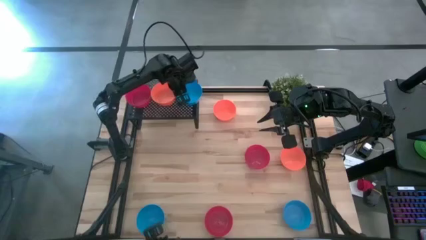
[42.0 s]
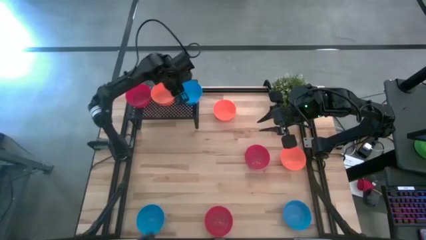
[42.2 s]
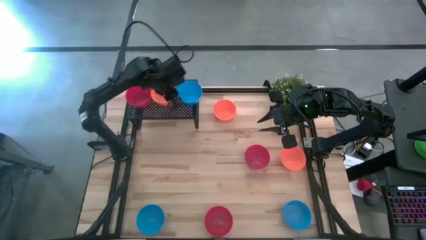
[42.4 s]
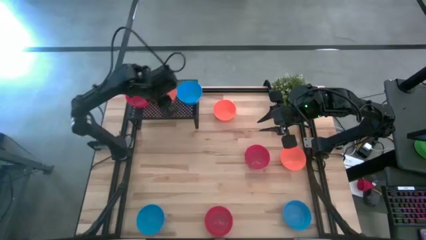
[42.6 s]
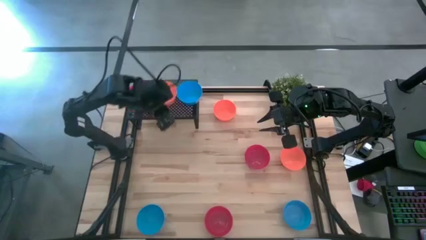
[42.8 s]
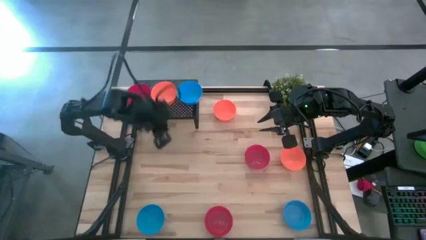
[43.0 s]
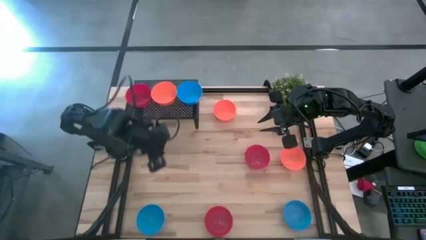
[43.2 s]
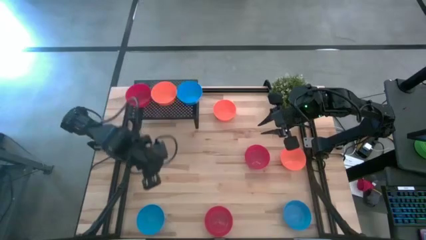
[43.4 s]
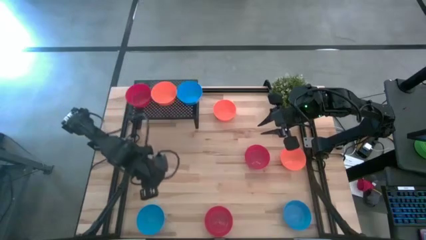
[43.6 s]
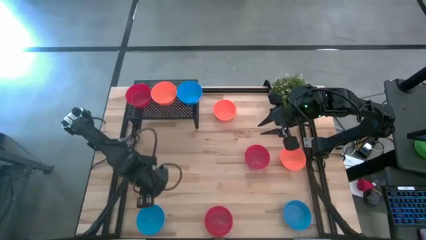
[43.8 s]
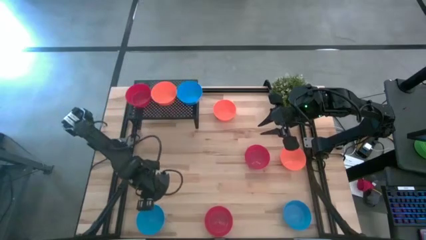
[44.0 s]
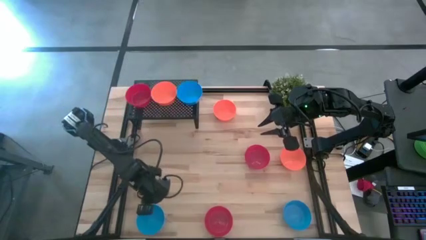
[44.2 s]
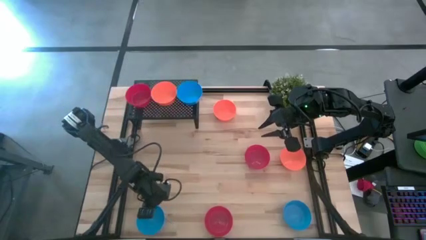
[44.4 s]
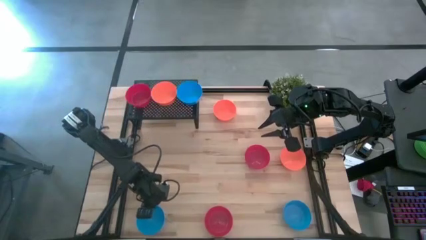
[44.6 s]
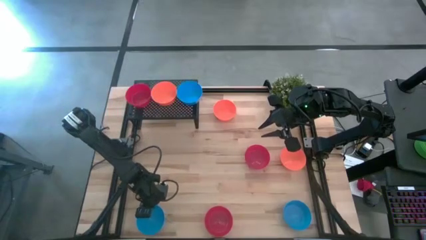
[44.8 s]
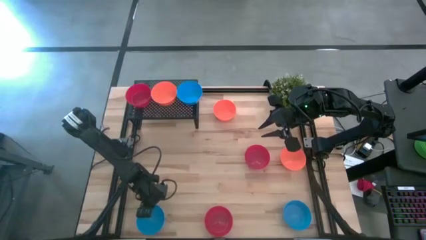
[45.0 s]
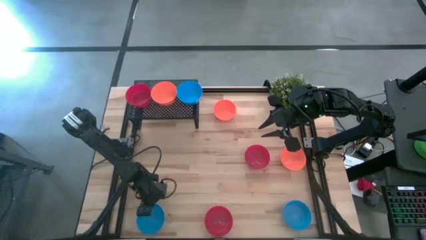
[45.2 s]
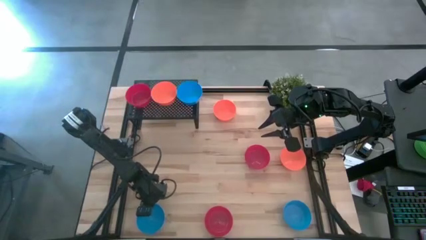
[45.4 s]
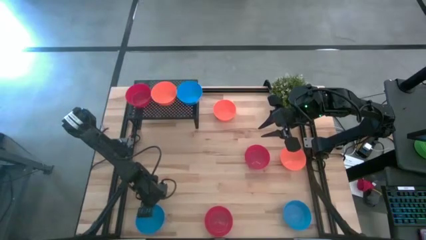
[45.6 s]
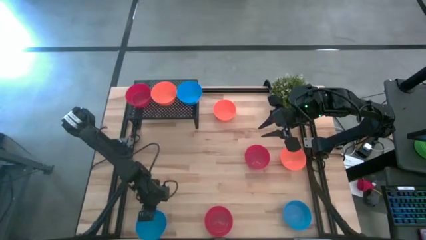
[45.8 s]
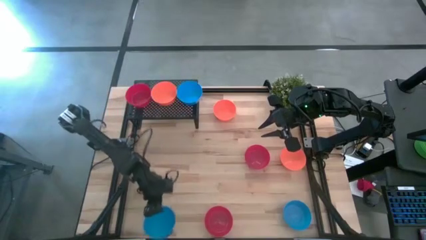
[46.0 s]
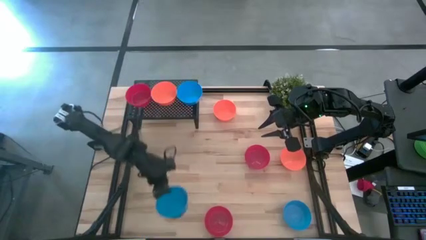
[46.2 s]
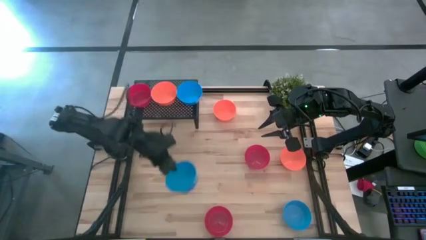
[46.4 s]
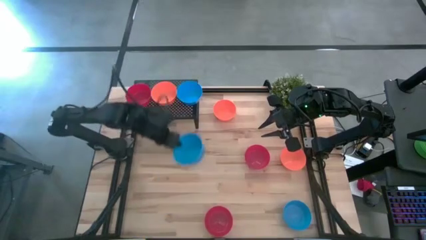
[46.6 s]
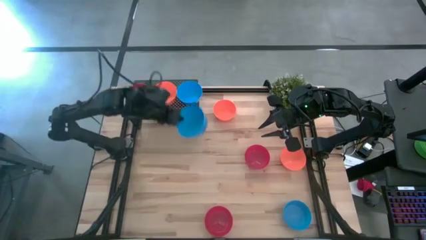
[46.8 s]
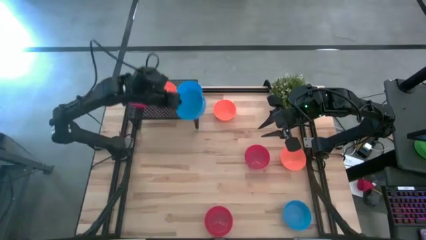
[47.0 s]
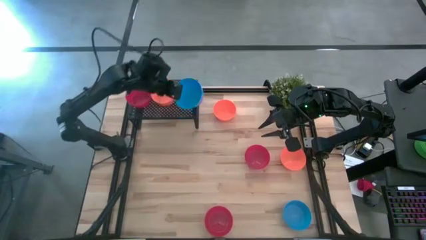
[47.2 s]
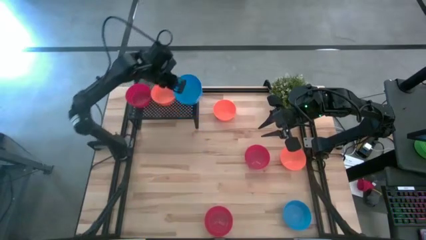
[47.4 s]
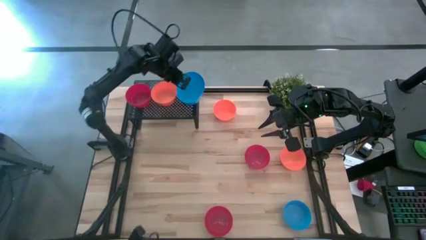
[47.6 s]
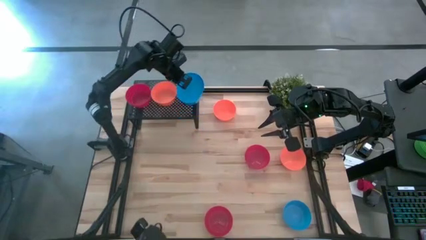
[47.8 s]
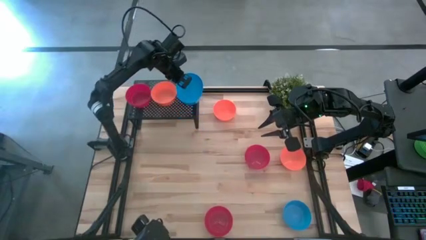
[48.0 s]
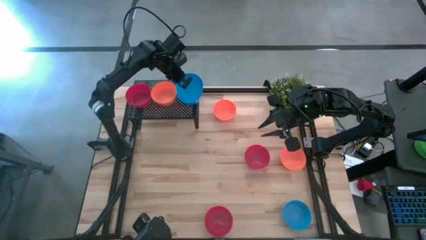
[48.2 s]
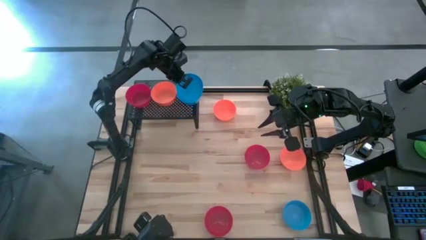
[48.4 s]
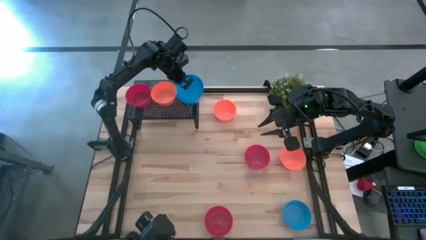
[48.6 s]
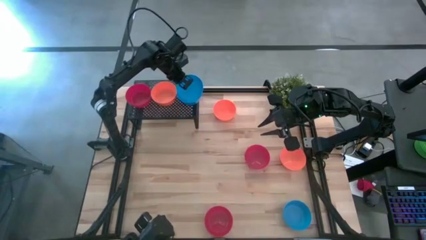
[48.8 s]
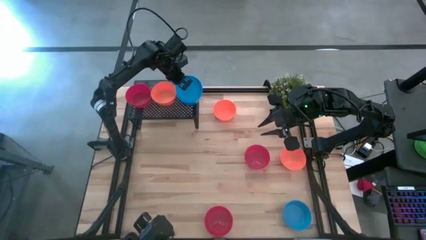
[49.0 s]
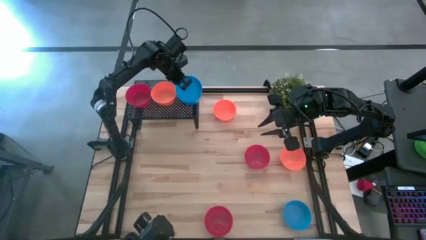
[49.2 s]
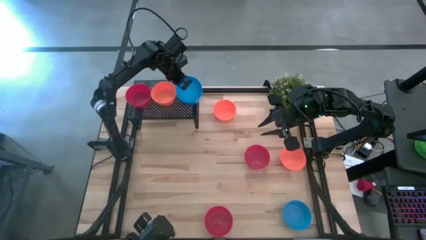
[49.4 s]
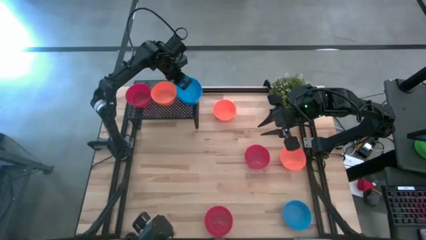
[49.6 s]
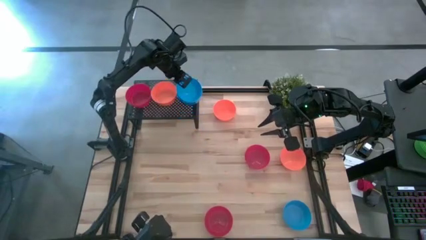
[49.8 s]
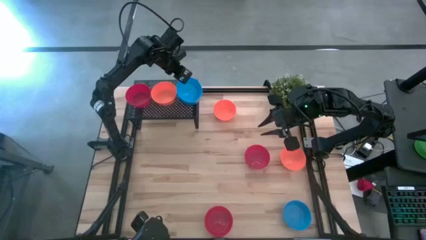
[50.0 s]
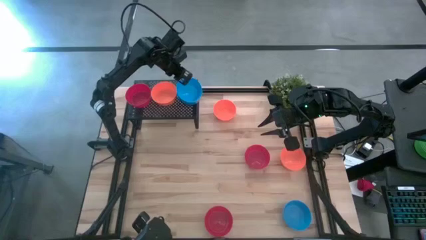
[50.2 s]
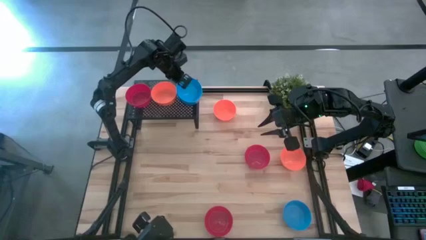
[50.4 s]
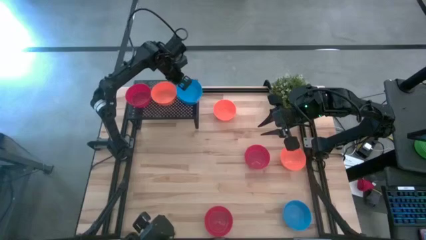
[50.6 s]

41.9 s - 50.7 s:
Task: Pick & Place Mini bowls
Stack the left blue bowl on top of the blue bowl on the shelf

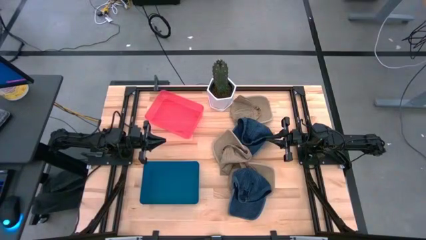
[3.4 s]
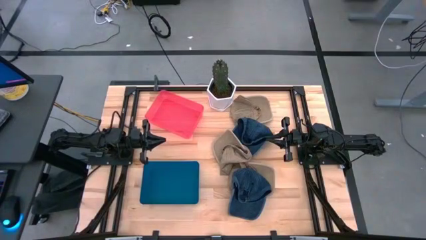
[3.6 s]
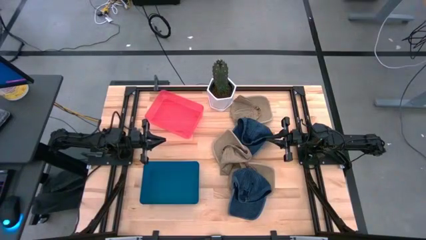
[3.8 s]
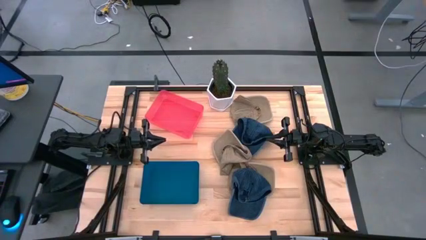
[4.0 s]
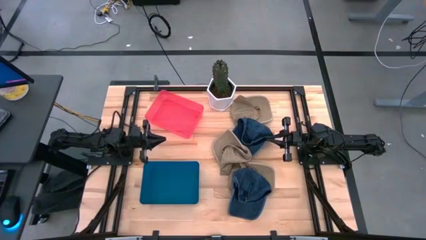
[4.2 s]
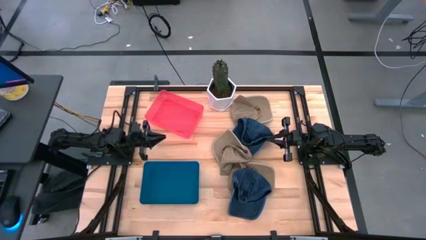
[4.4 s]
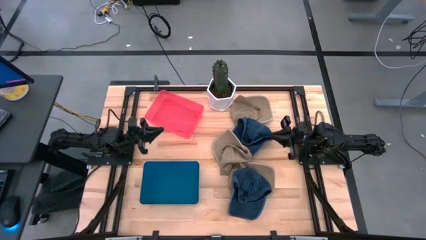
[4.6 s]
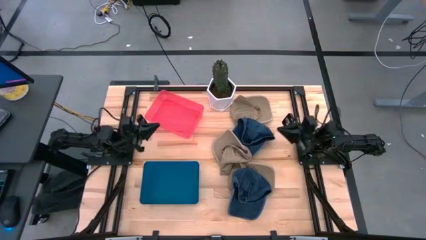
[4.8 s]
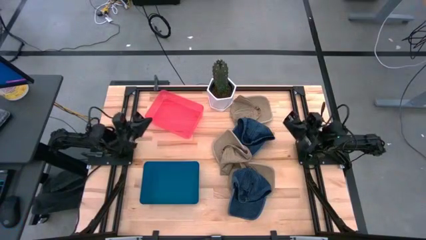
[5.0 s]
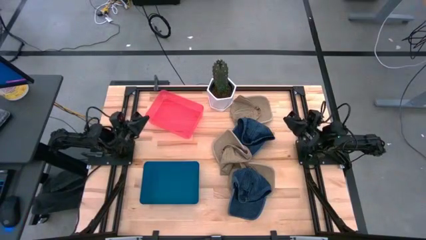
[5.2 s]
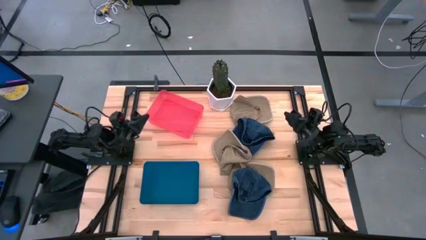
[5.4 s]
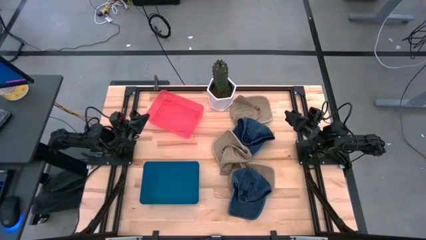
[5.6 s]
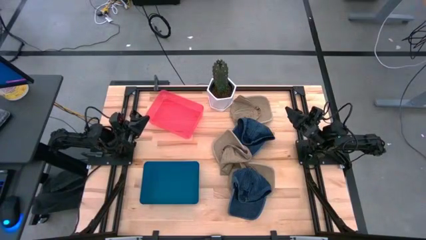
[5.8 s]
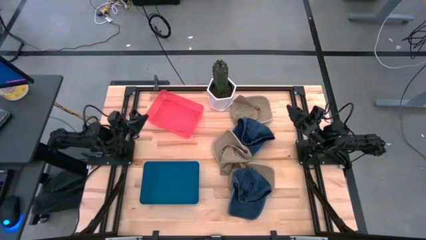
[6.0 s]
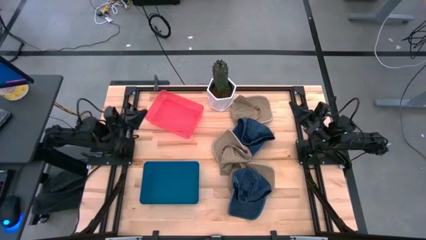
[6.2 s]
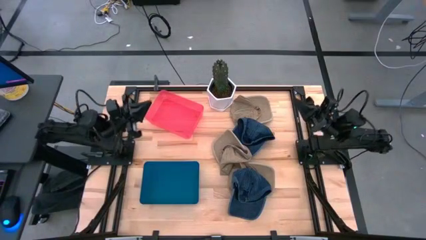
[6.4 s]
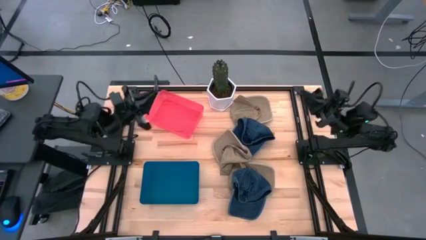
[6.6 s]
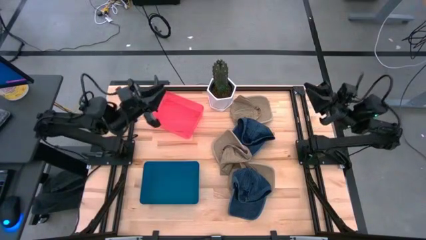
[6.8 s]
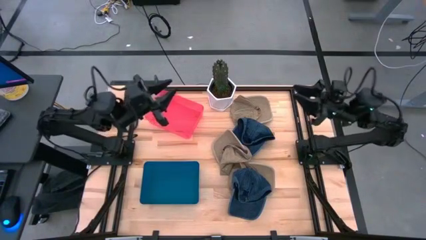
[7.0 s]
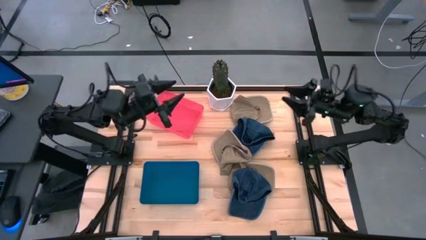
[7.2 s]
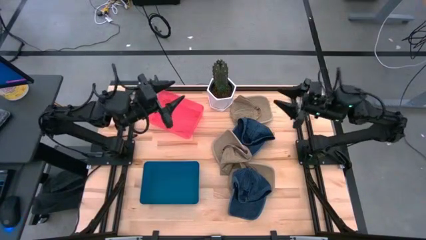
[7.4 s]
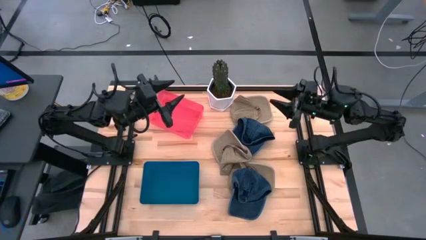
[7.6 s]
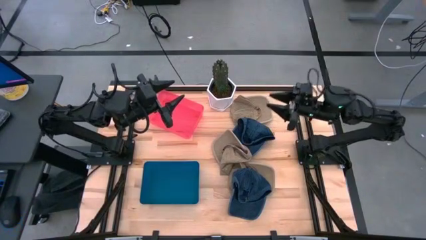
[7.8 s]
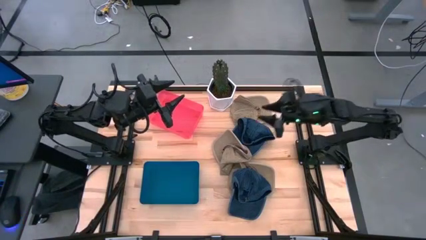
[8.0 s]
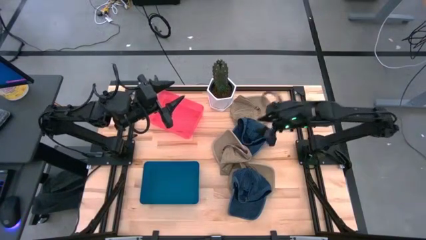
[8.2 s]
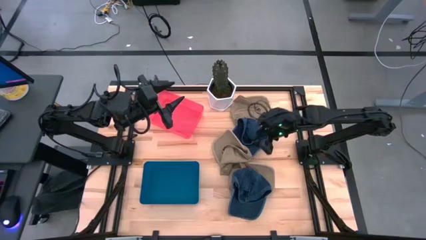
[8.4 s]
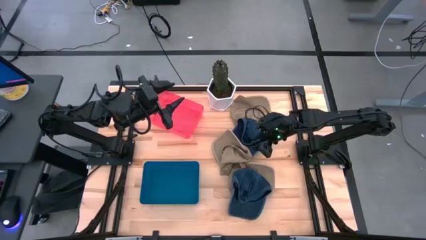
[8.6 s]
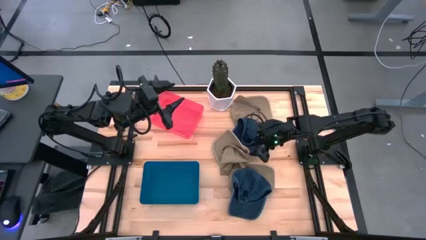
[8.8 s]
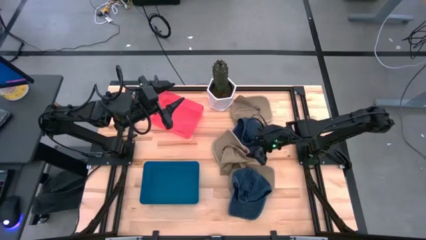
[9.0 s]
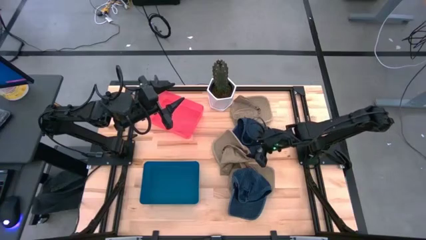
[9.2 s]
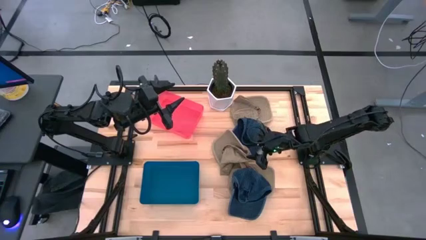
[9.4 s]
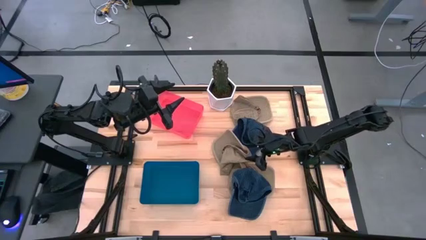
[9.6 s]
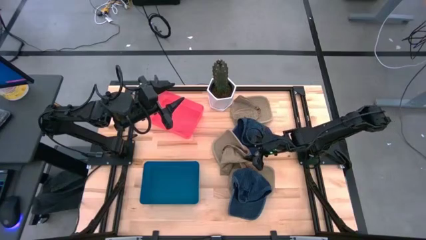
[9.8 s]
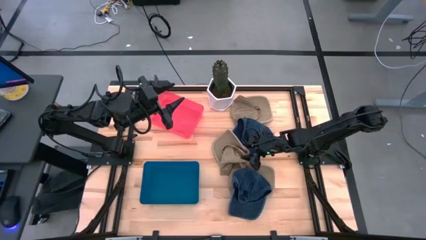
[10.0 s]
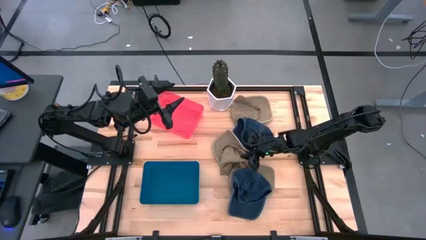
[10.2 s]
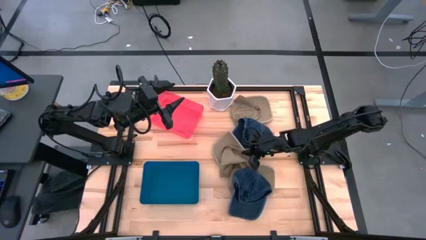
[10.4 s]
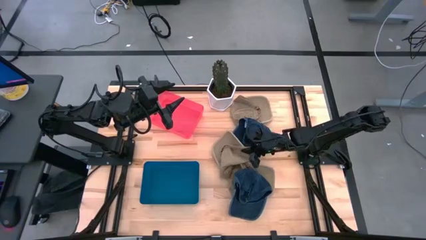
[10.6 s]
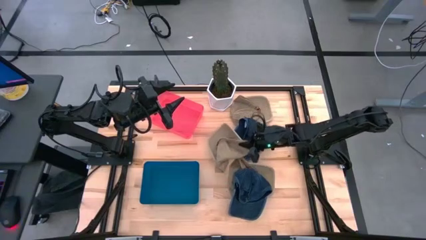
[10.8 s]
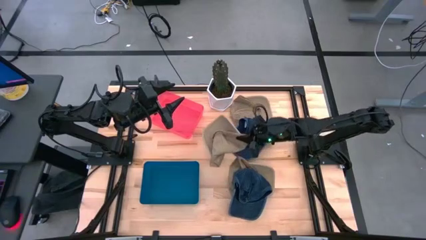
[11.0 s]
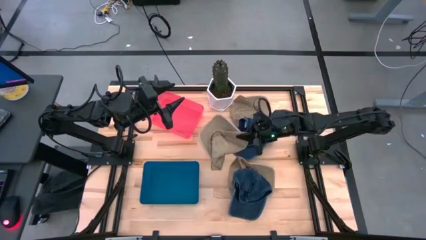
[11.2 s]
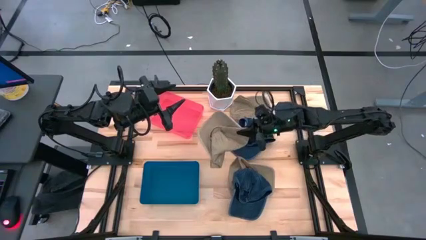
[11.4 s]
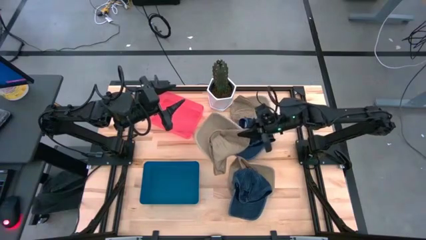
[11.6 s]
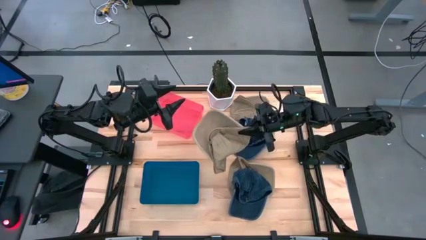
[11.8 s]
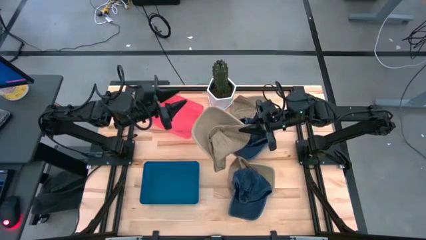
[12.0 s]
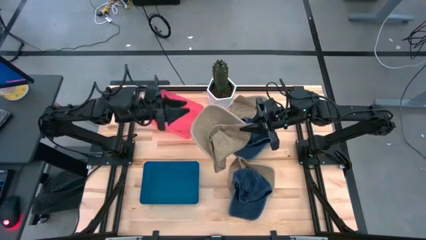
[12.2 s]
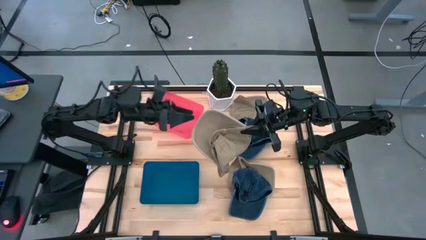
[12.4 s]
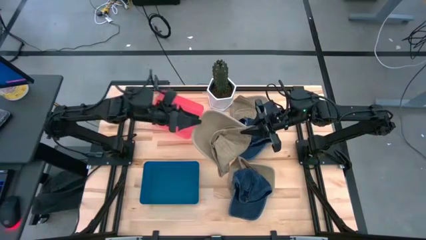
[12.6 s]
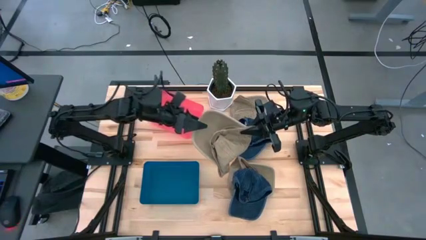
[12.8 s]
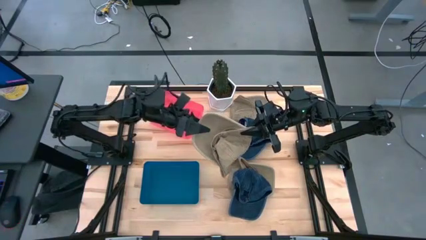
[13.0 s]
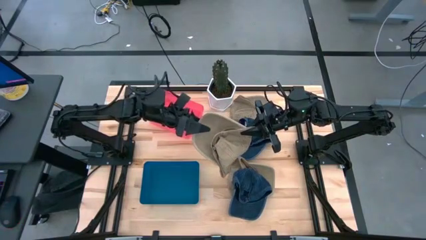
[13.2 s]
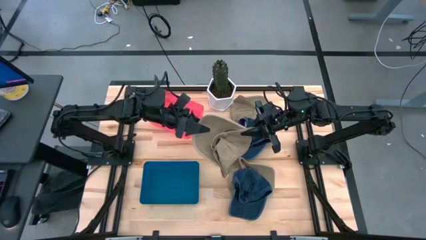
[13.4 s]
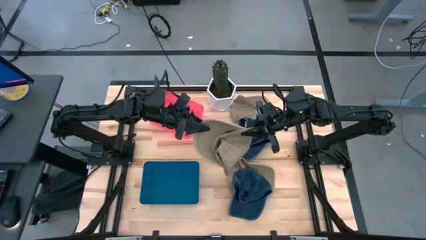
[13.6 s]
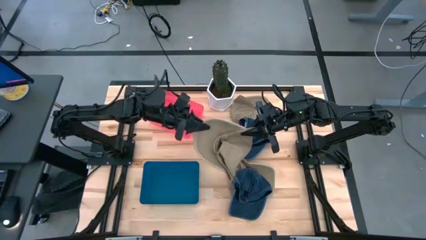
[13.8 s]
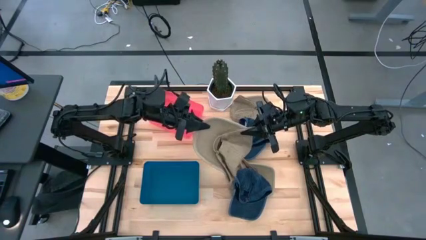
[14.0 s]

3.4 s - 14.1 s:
Task: Pick & Place hat
Put the middle brown cap into the blue bin
